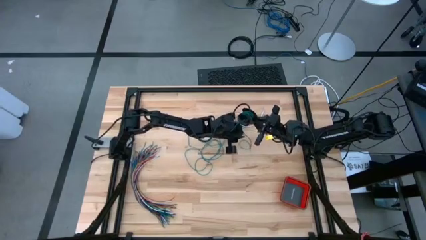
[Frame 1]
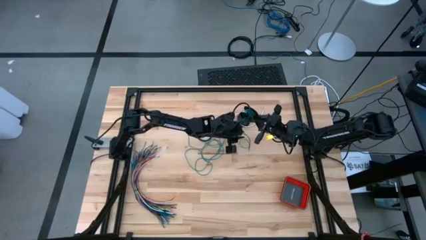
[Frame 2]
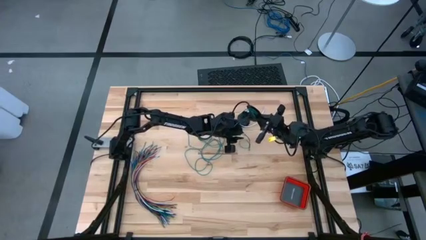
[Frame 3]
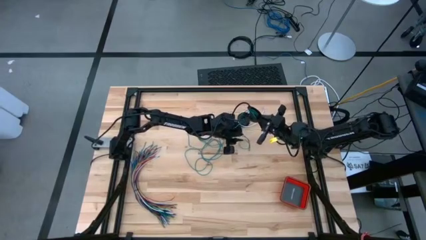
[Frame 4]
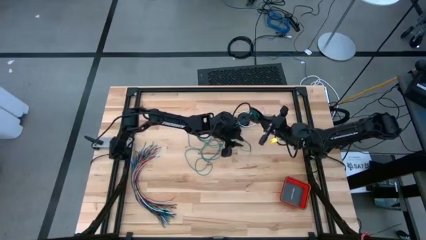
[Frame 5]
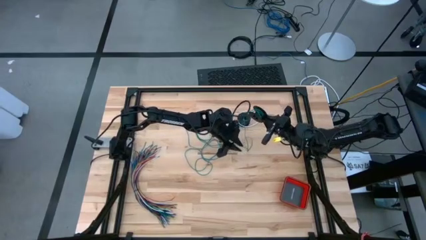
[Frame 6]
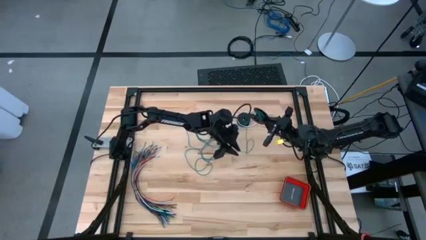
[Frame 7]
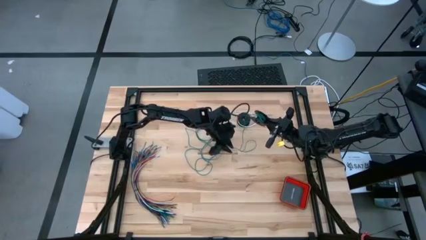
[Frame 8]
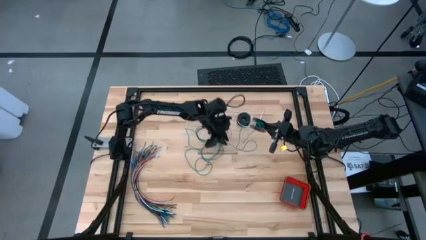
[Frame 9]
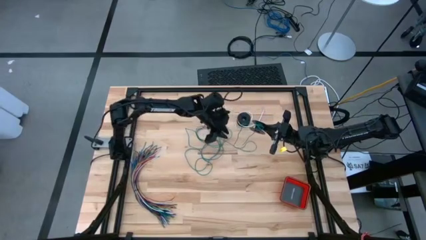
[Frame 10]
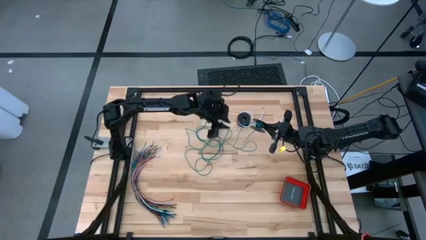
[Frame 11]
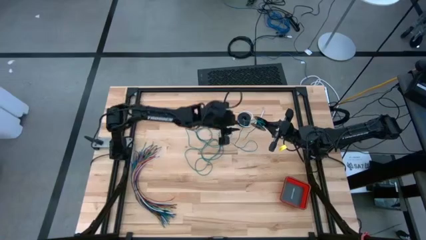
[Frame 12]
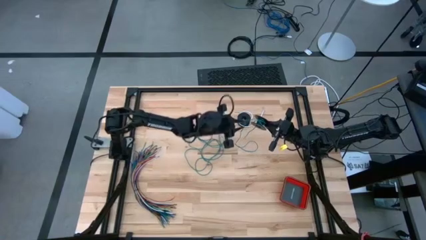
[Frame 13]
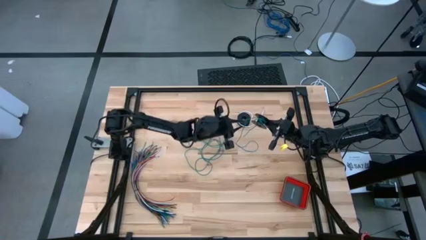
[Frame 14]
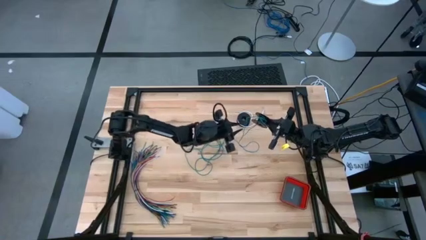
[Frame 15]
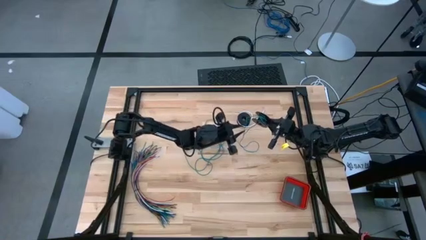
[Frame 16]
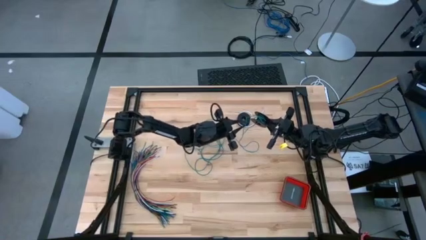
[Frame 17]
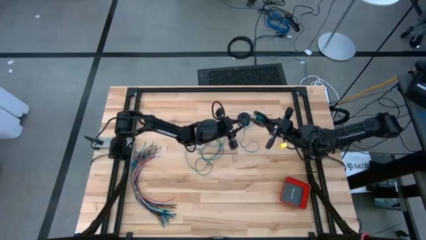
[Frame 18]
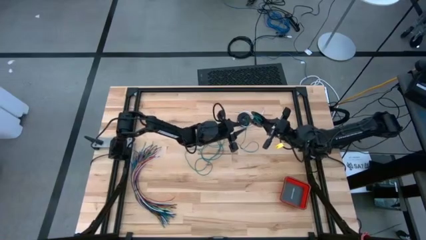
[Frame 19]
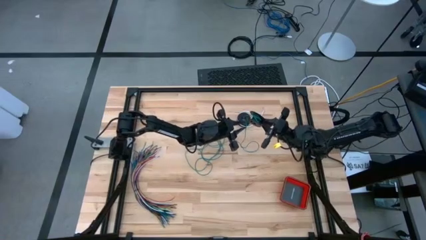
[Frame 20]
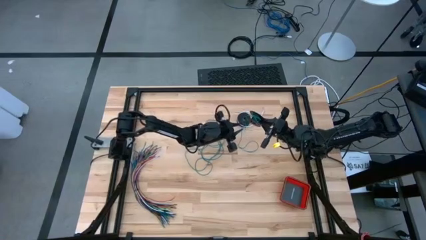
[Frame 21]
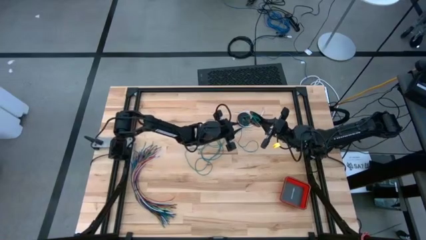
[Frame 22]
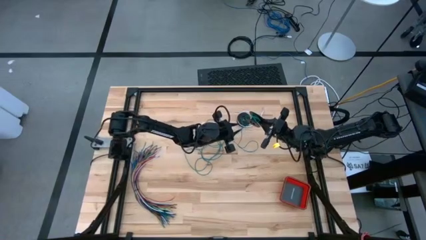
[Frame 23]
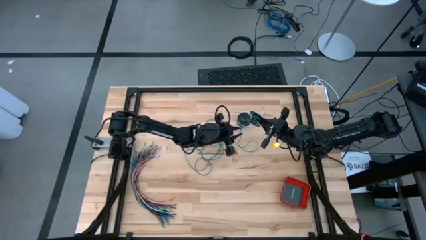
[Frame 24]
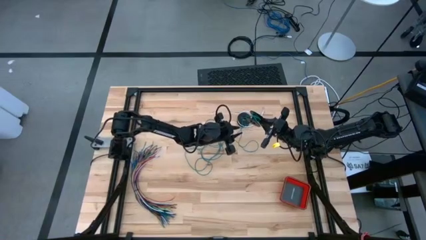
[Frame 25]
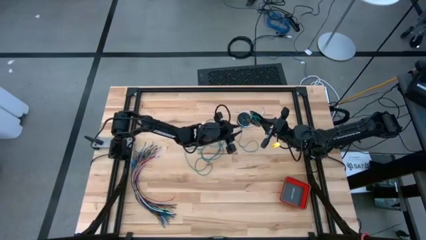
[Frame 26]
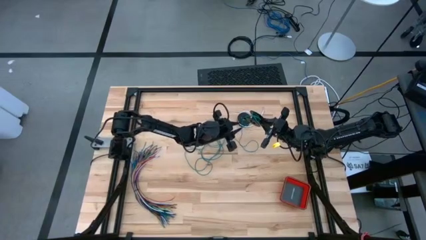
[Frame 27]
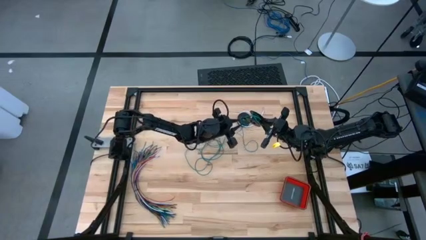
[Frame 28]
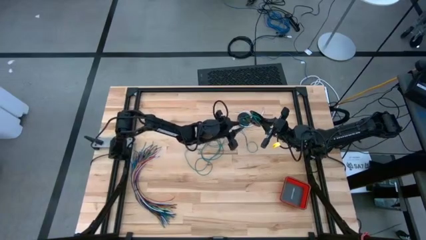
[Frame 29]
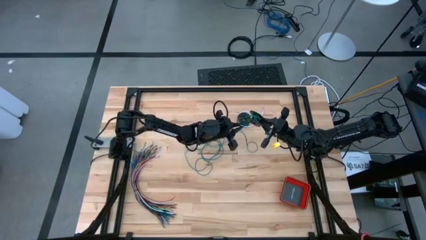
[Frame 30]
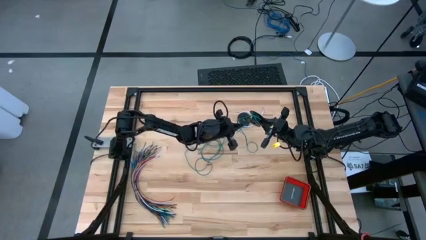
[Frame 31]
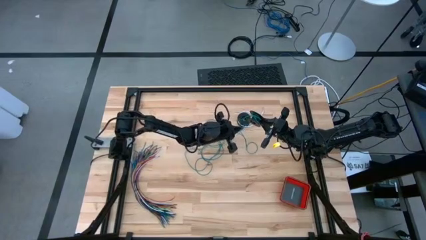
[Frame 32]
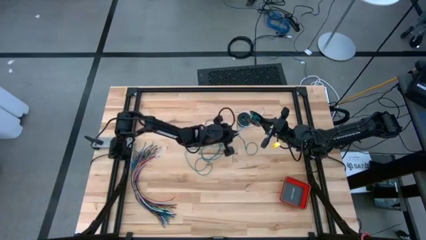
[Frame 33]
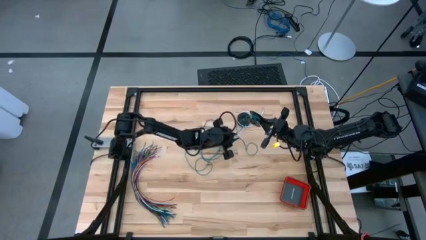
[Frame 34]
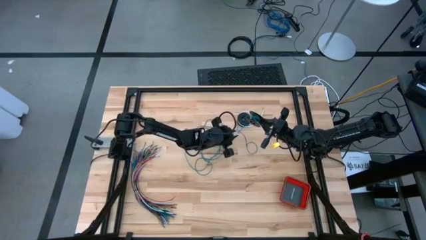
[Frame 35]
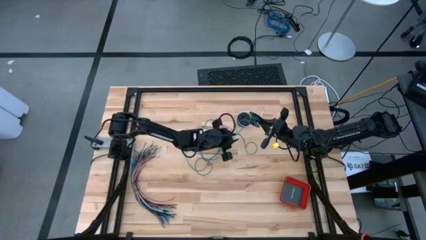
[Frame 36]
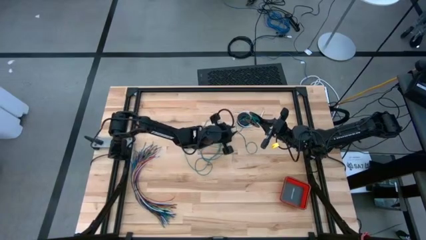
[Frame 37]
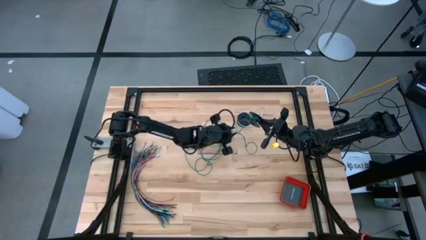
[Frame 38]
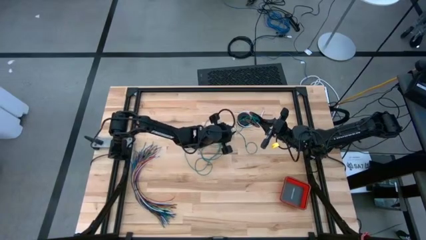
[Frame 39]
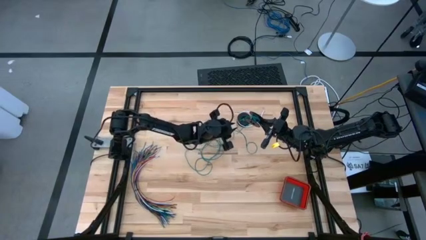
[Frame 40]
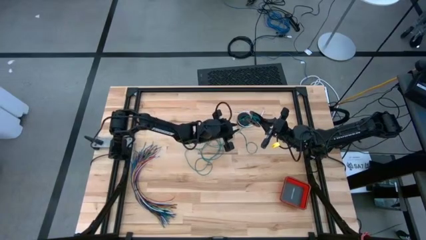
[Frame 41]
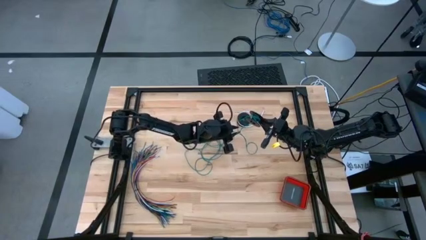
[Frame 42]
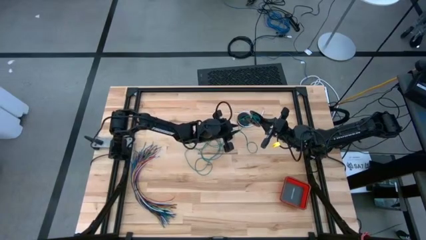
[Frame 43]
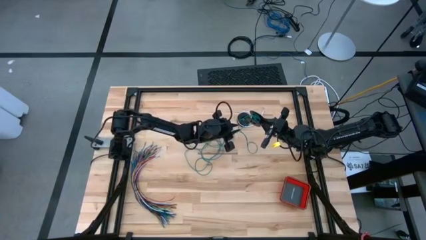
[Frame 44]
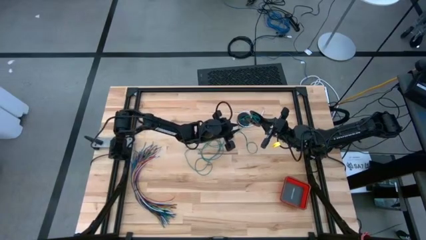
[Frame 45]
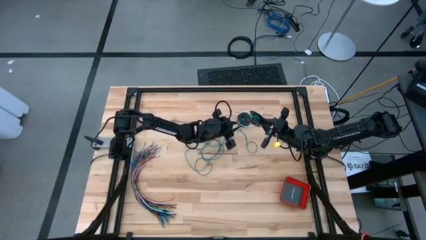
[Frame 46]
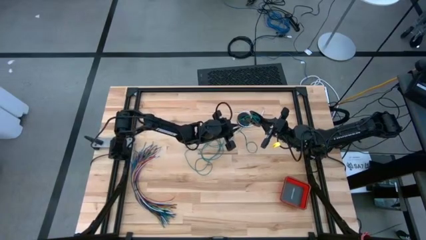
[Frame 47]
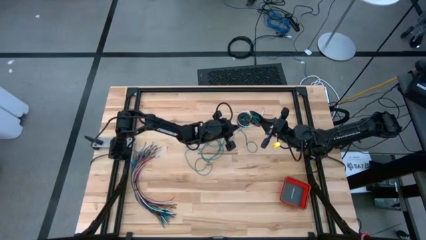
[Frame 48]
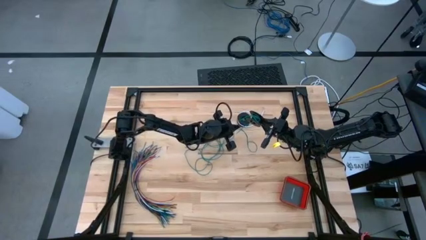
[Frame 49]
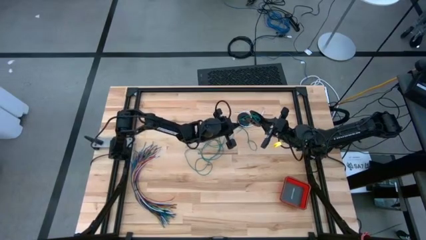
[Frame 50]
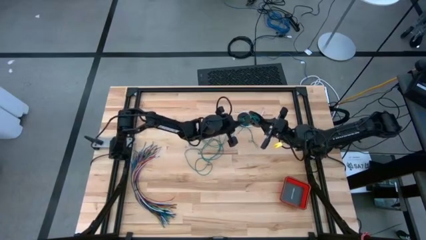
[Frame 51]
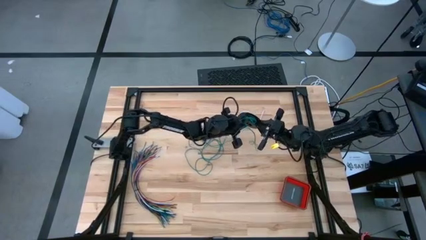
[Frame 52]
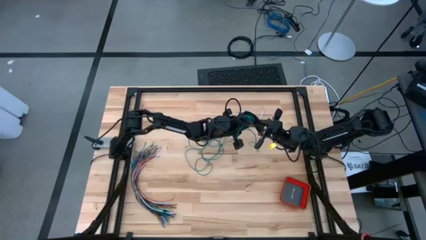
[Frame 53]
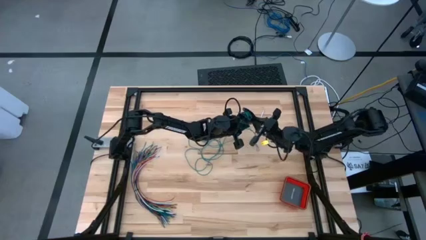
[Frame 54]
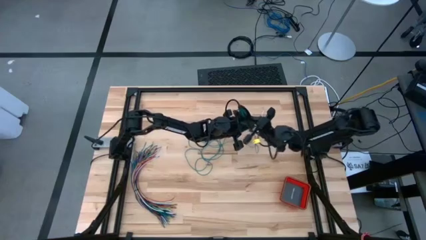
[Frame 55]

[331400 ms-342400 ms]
Task: Coil cords
Coil the green wire onto the spool

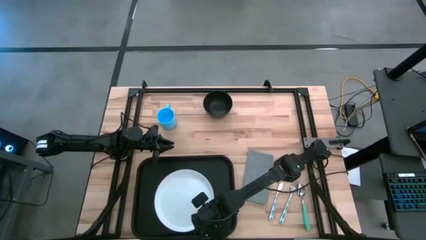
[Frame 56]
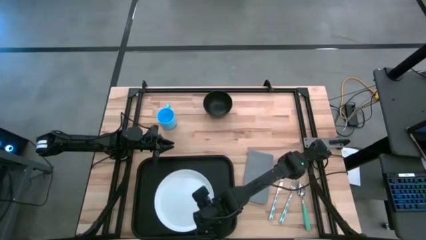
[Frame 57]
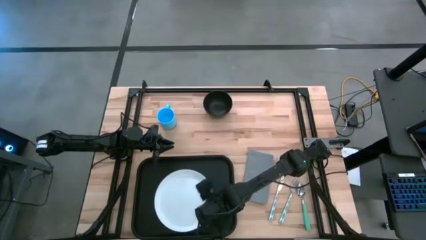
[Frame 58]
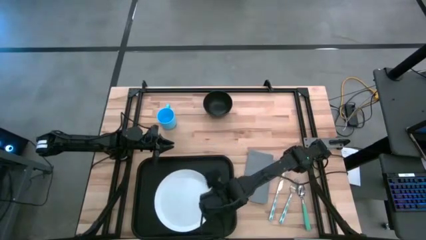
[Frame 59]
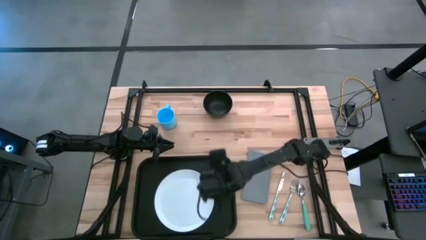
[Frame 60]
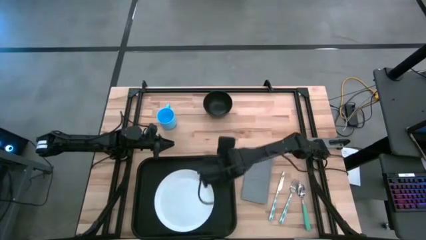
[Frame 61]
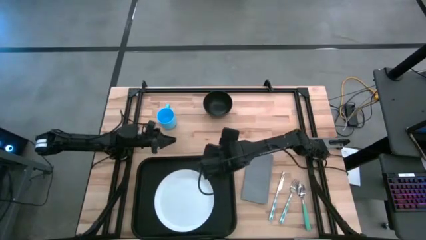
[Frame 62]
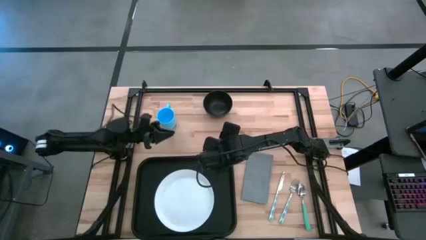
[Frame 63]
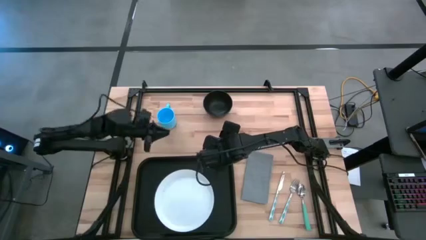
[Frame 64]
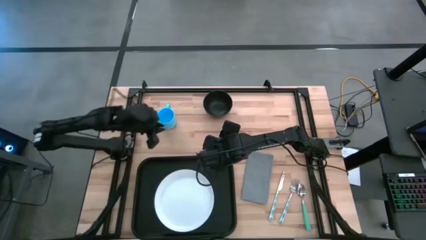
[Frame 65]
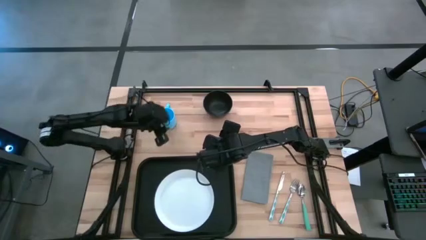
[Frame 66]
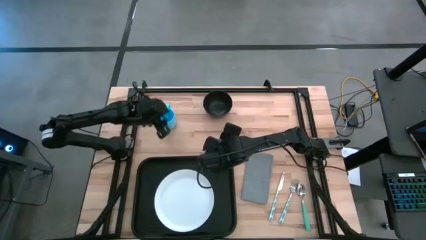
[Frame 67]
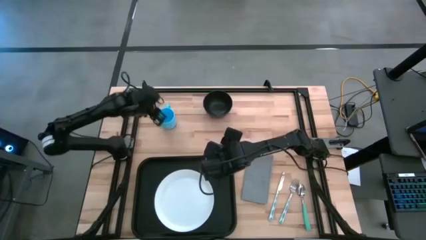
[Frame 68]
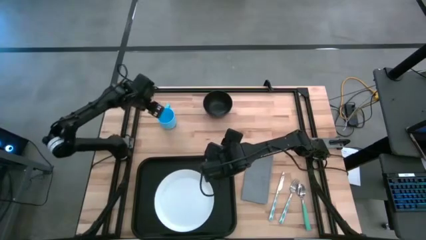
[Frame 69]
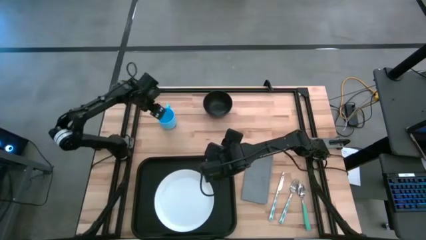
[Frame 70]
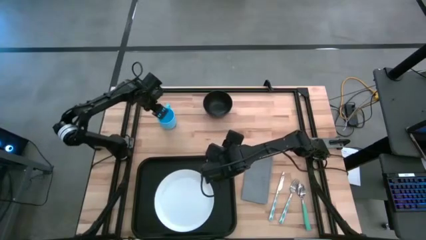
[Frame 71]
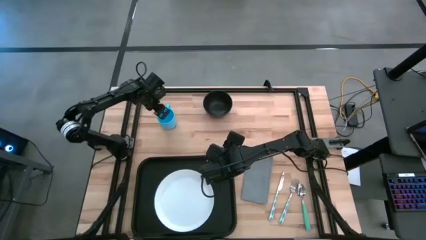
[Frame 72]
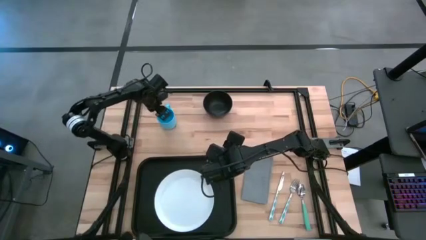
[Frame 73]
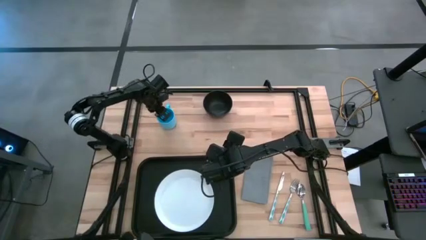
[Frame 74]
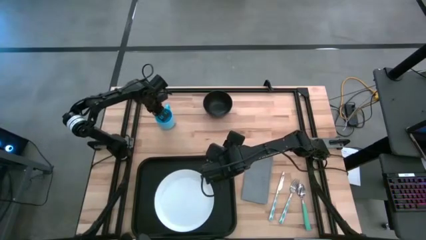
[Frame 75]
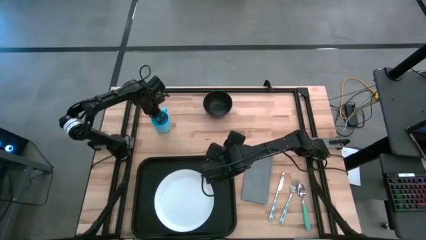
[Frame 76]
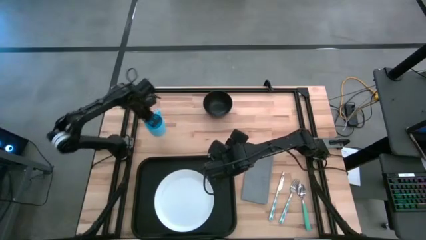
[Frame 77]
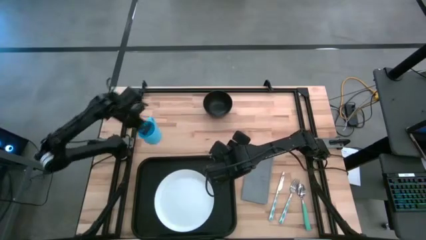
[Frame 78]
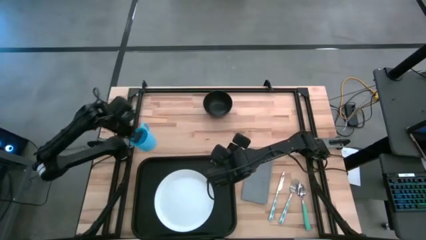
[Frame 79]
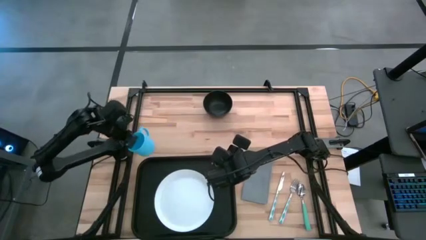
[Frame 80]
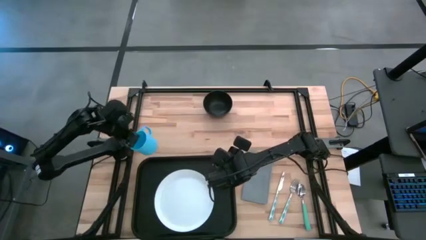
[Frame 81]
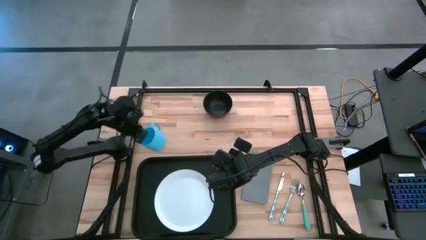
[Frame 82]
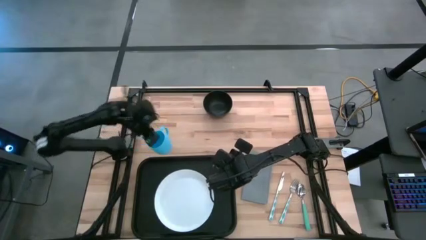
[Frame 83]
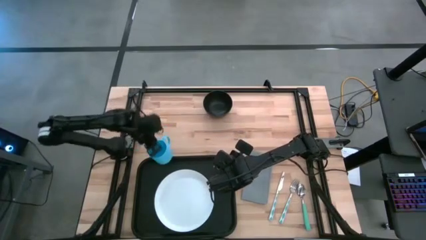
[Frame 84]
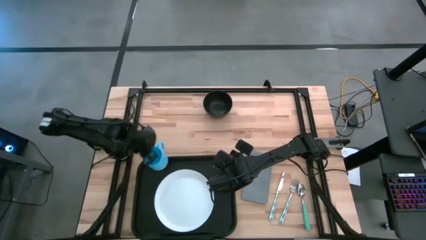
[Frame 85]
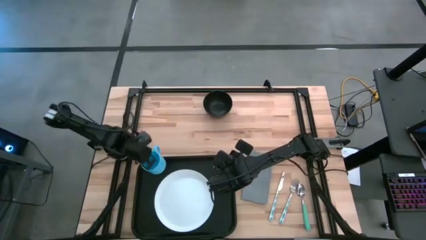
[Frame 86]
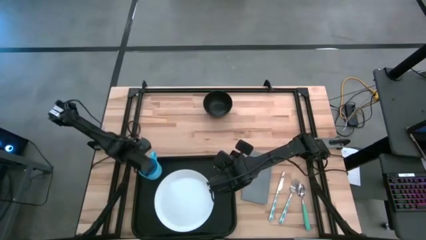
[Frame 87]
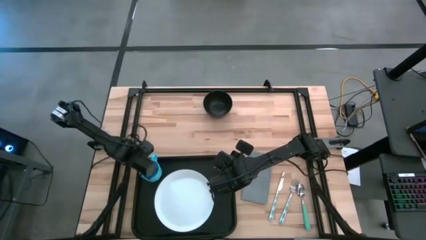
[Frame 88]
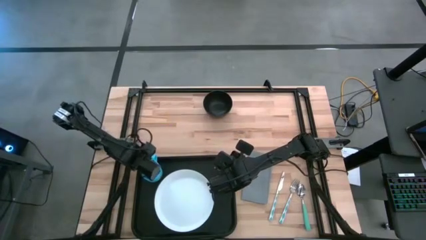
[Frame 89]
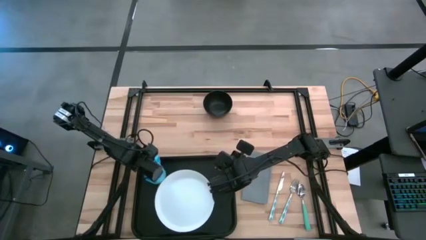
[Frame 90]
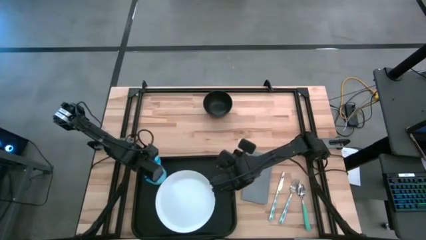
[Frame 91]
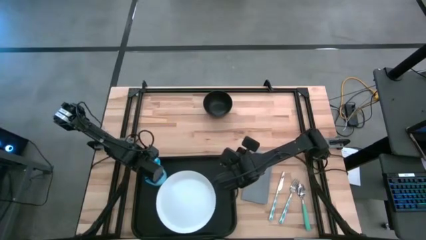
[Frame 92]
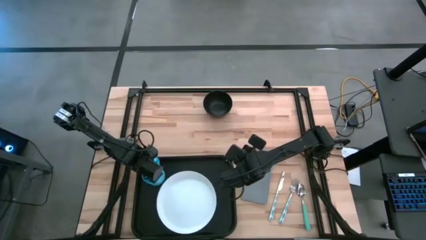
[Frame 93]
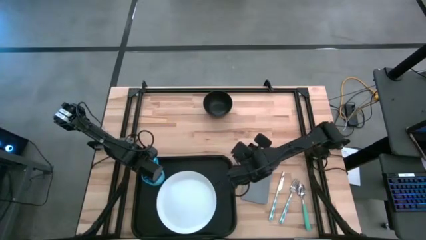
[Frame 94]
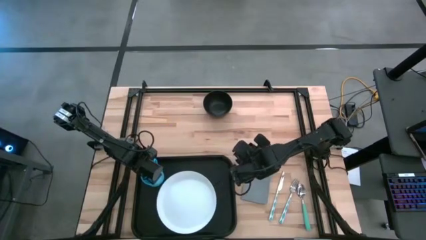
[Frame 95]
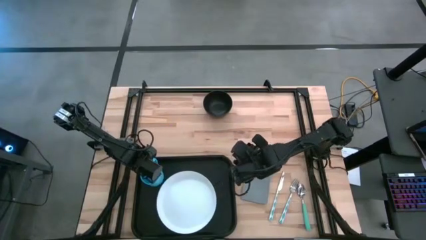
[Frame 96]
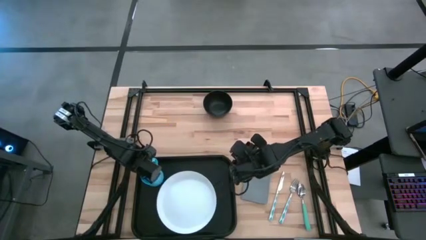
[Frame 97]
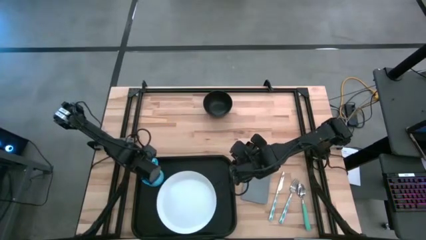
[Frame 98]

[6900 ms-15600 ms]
Task: Set up tray
Put the blue mug on the black serving tray to the top left of the white plate
